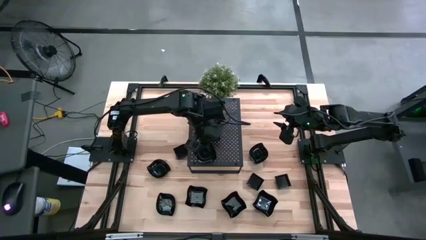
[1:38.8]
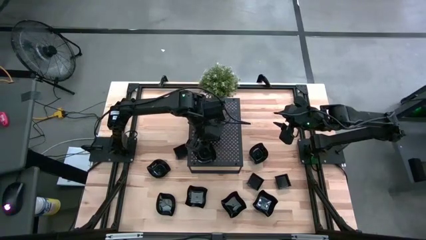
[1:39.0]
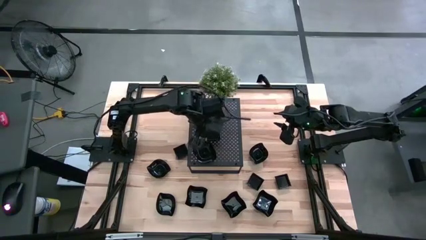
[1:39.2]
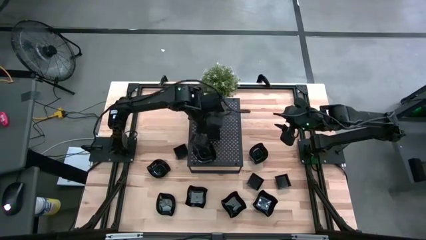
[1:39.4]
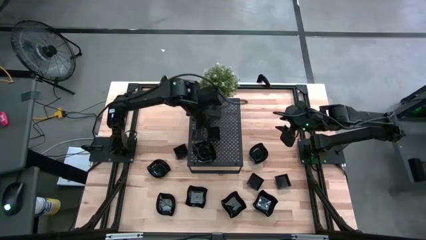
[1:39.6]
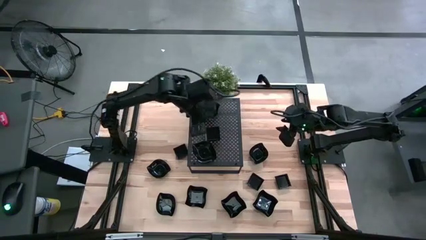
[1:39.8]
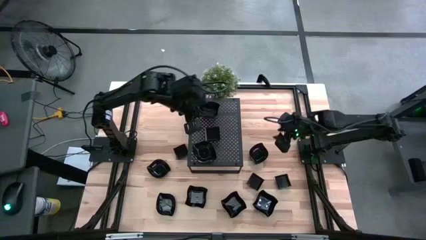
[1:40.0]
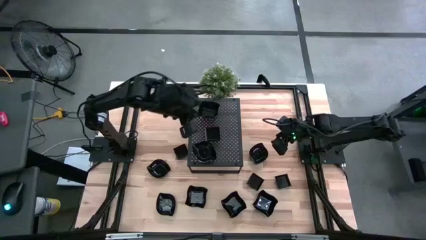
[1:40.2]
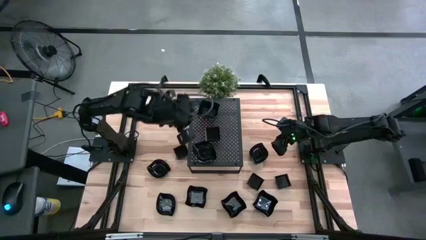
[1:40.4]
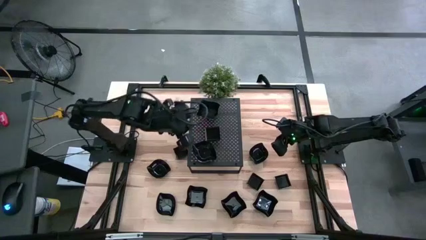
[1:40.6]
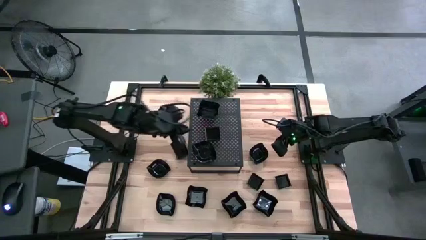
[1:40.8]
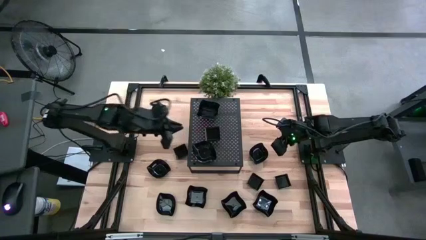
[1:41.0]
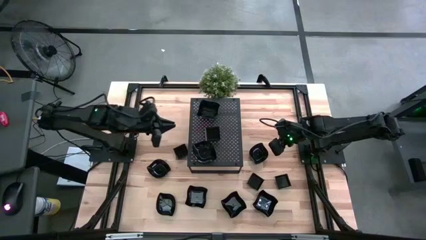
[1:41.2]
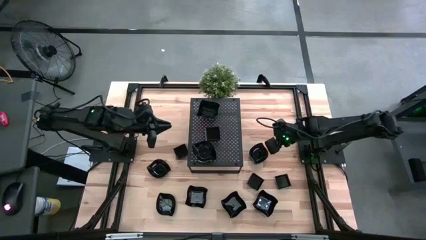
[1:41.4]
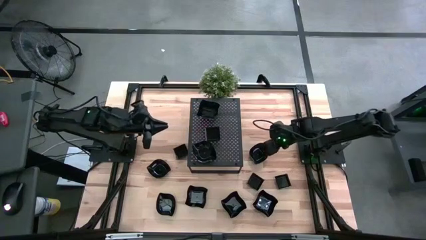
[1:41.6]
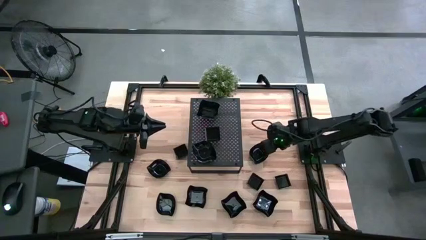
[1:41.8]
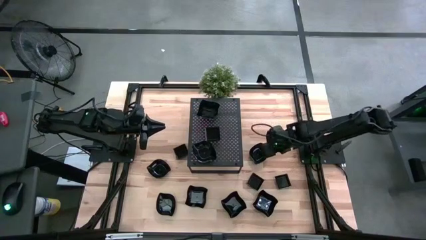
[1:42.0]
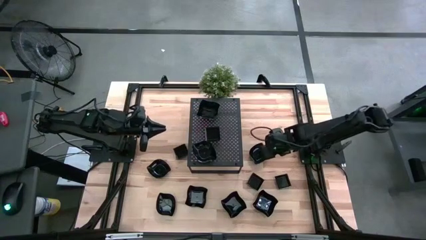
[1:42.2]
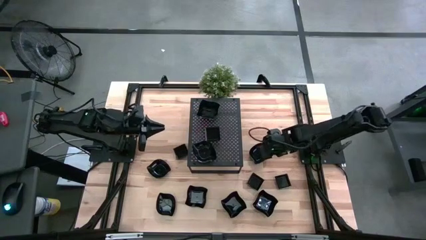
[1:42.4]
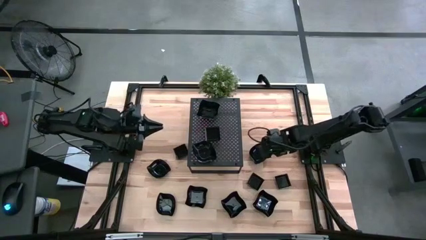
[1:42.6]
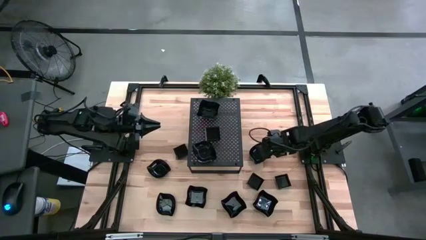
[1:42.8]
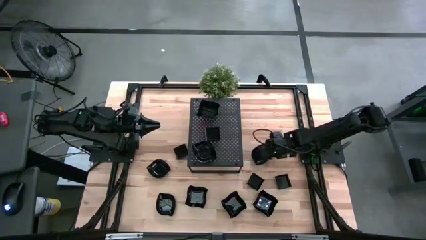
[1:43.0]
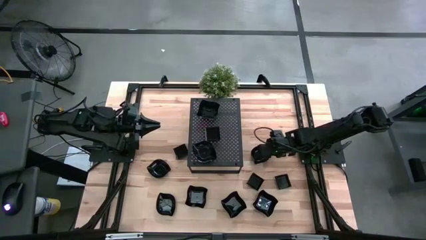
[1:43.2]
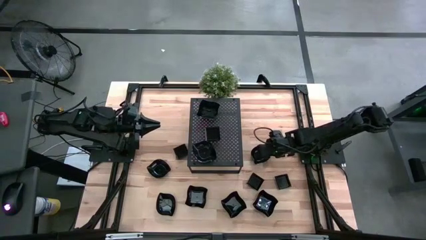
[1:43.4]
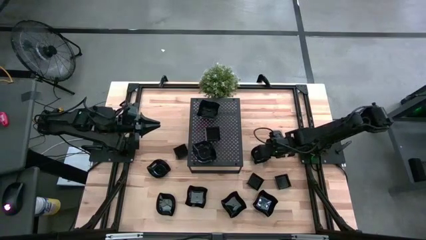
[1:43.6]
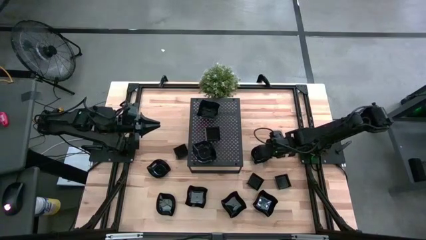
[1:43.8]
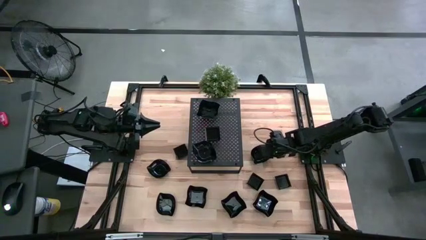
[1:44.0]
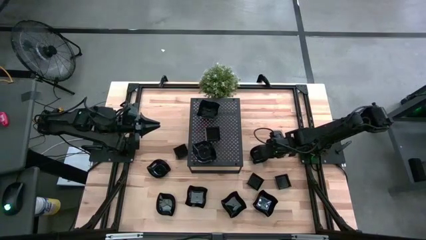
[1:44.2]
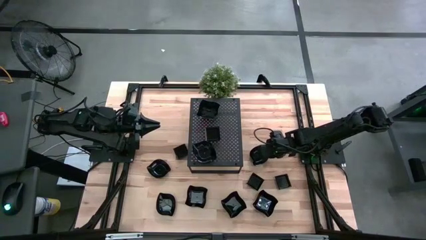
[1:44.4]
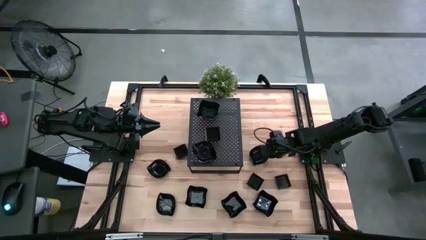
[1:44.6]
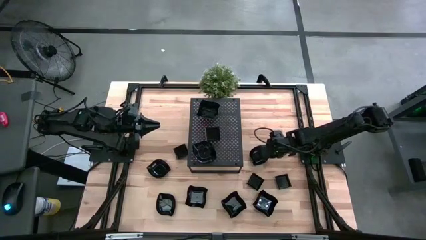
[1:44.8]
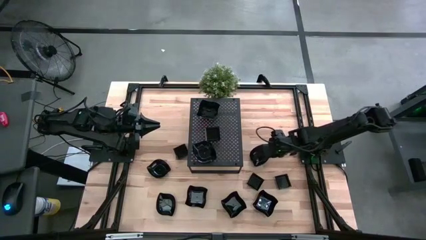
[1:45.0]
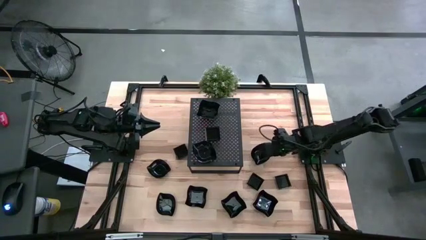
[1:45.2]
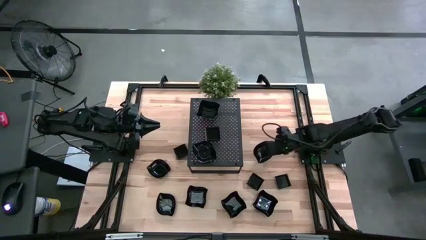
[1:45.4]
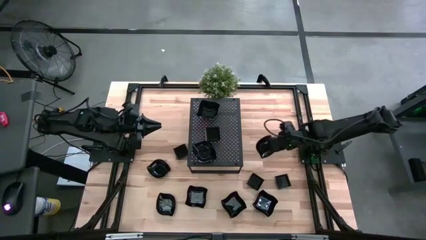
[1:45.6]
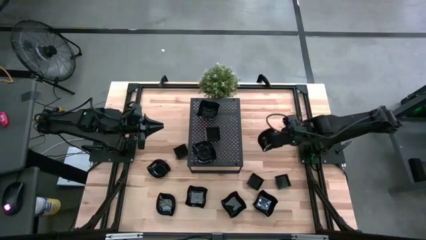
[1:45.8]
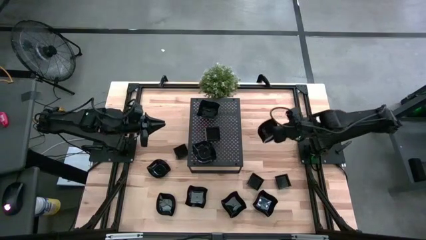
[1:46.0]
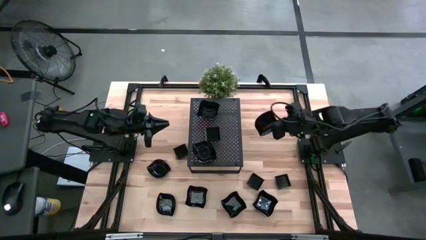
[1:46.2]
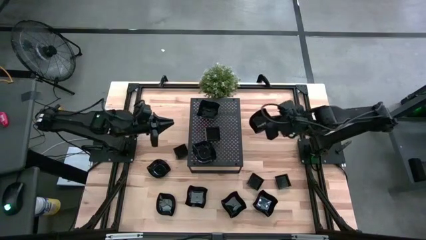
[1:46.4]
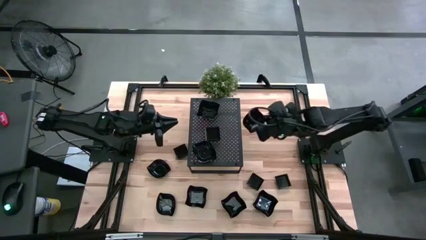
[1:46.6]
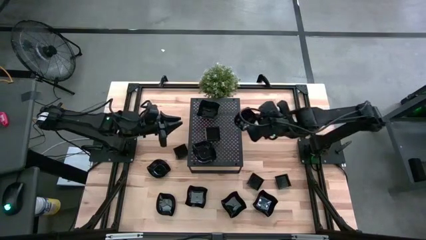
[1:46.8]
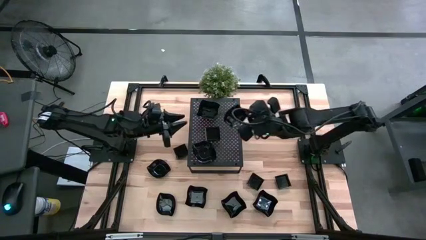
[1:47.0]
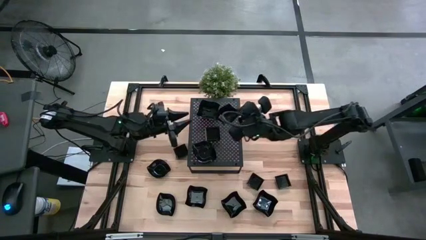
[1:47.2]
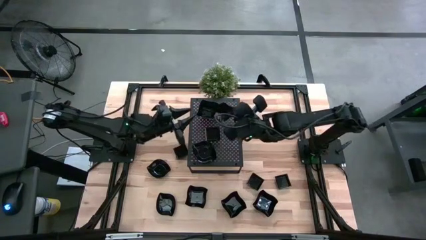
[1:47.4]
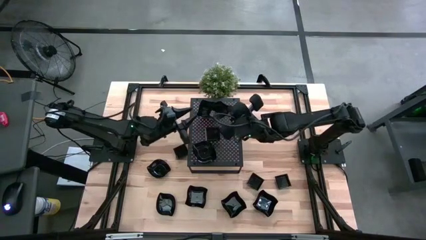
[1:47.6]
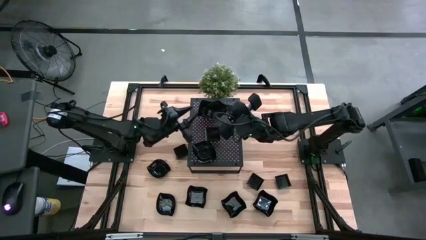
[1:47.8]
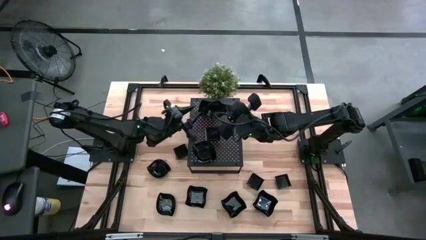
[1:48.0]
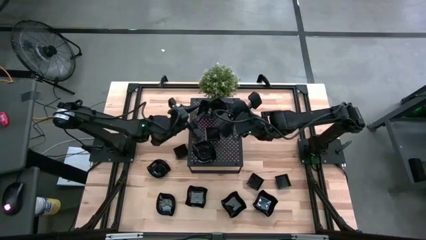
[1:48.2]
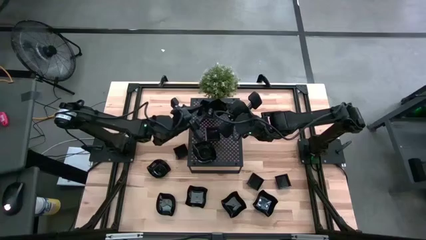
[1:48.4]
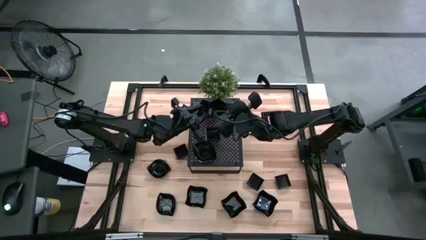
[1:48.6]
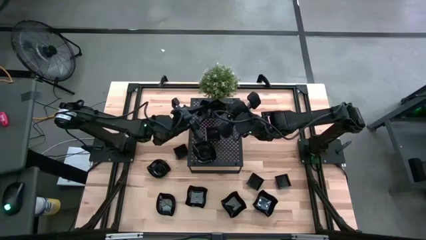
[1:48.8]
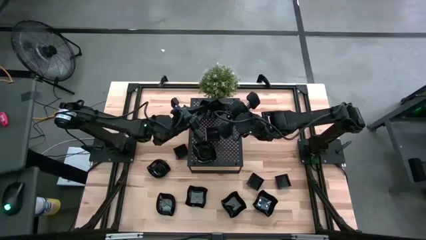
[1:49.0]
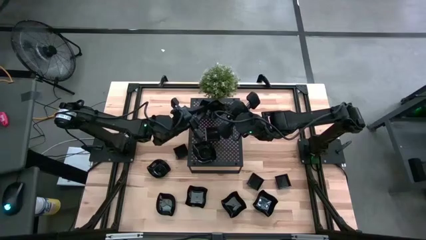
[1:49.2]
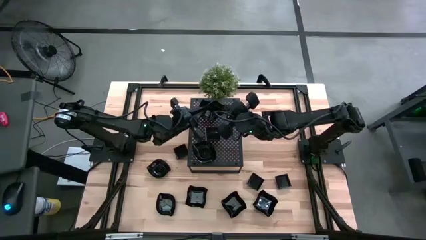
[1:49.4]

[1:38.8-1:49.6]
Task: Pick & Place Mini shaped plates
Stack the leaf-shaped plate on top of the leaf-shaped plates on the shelf
